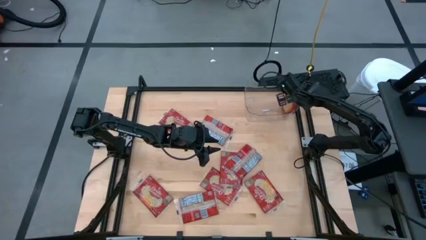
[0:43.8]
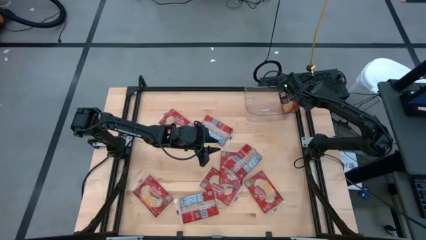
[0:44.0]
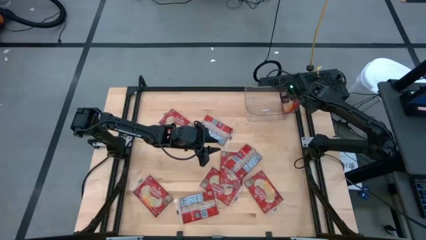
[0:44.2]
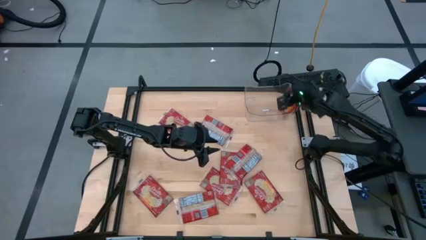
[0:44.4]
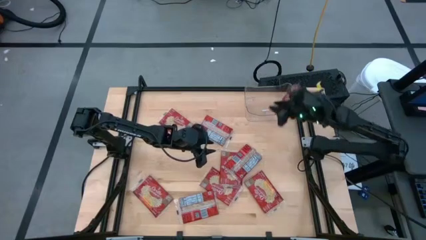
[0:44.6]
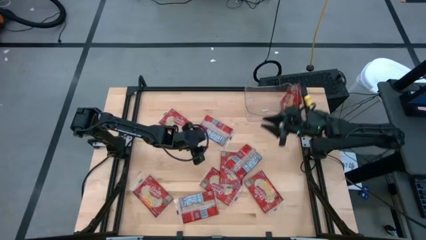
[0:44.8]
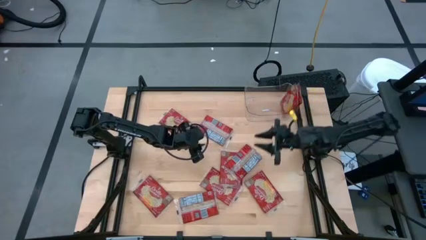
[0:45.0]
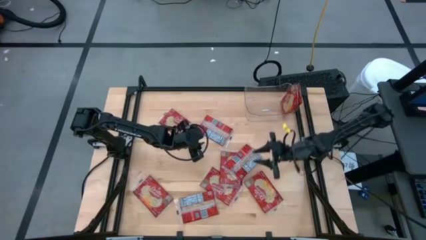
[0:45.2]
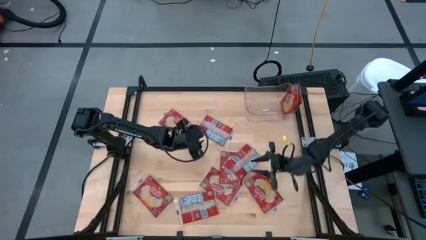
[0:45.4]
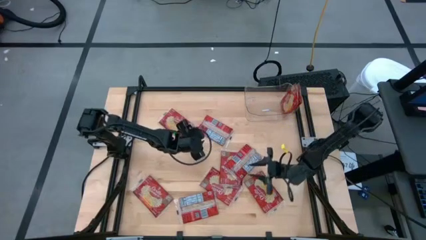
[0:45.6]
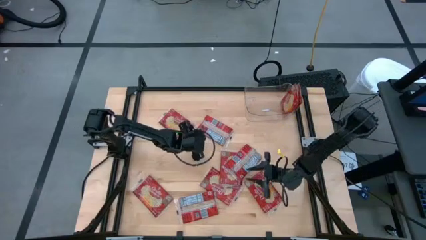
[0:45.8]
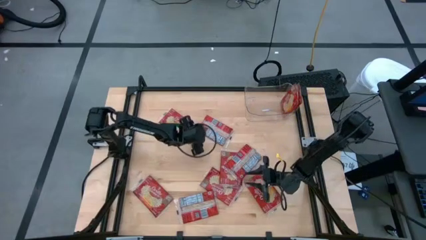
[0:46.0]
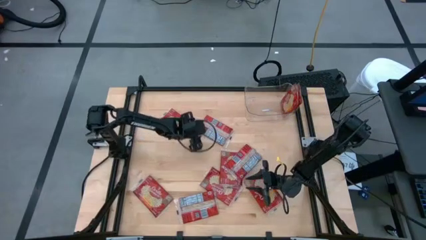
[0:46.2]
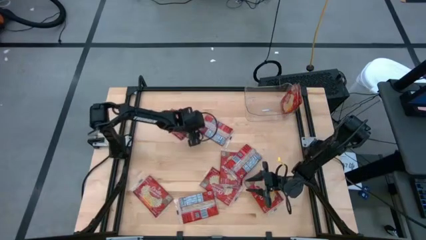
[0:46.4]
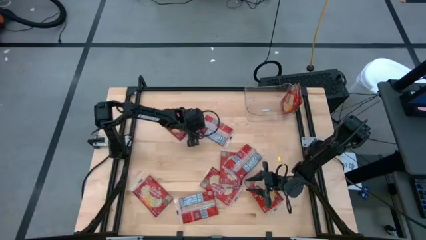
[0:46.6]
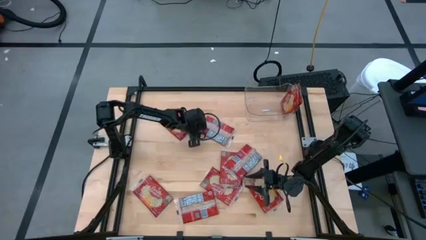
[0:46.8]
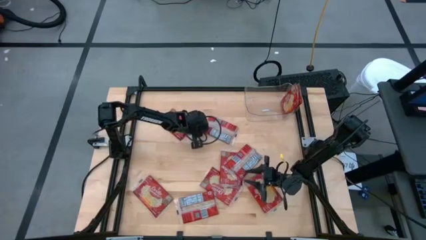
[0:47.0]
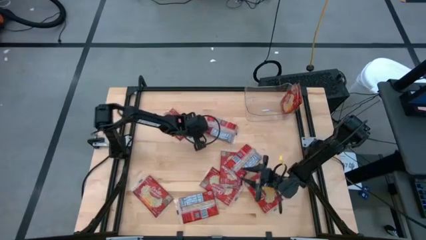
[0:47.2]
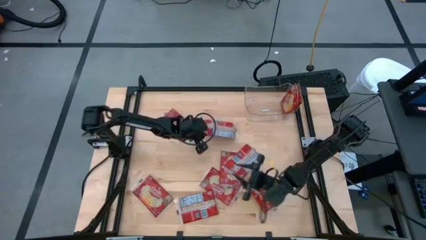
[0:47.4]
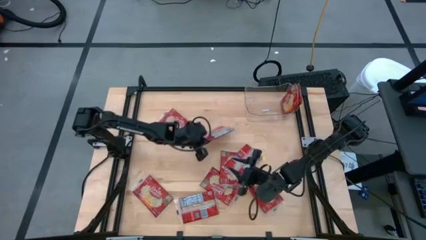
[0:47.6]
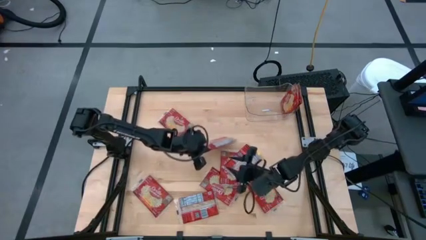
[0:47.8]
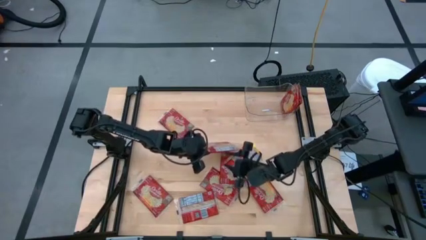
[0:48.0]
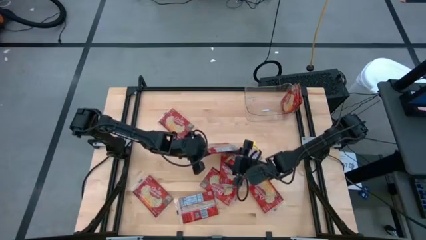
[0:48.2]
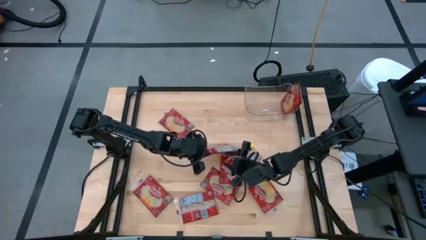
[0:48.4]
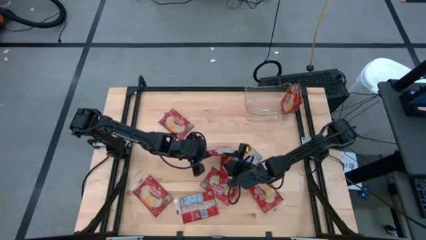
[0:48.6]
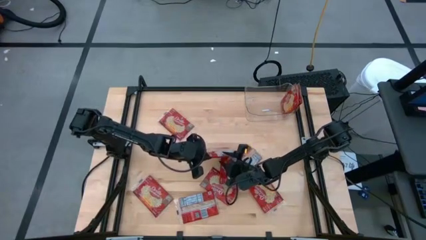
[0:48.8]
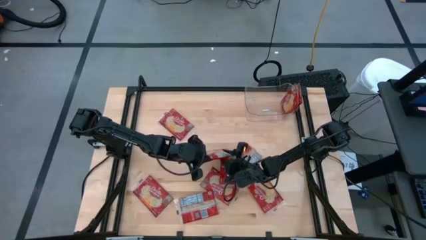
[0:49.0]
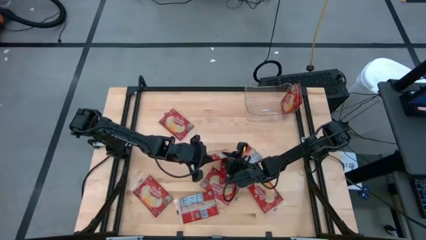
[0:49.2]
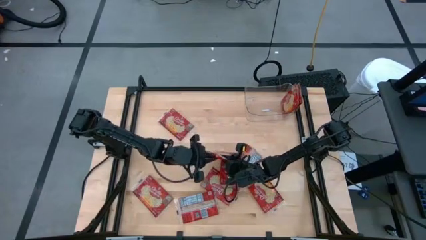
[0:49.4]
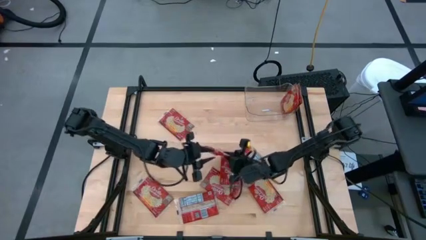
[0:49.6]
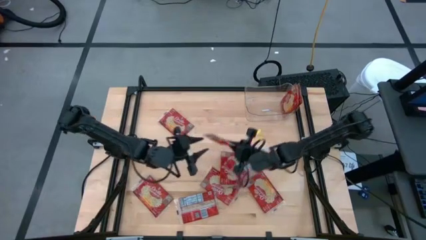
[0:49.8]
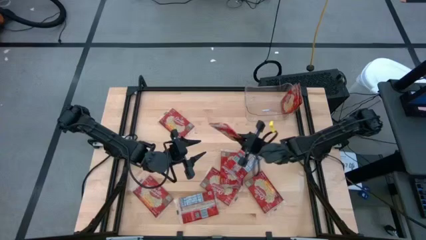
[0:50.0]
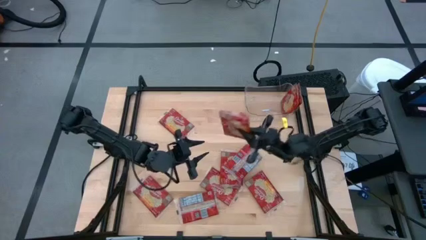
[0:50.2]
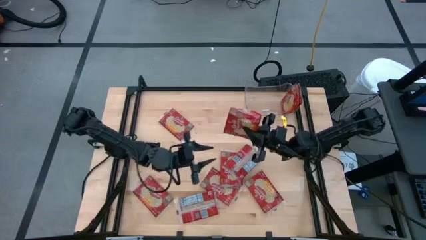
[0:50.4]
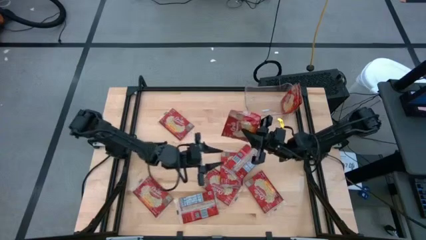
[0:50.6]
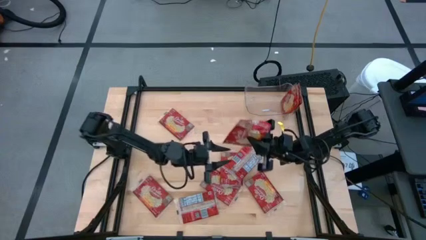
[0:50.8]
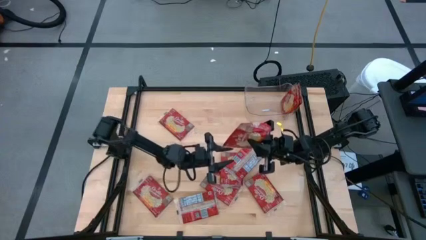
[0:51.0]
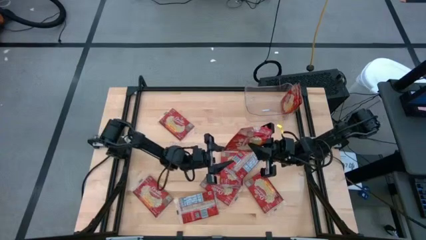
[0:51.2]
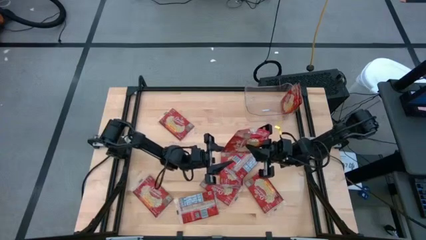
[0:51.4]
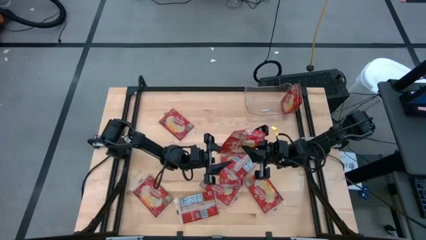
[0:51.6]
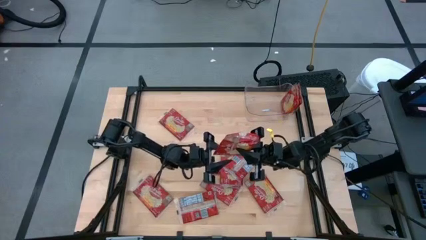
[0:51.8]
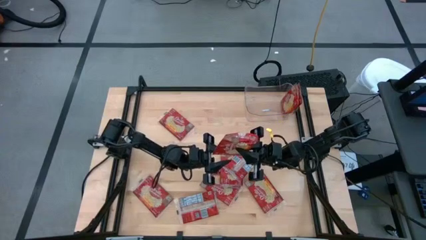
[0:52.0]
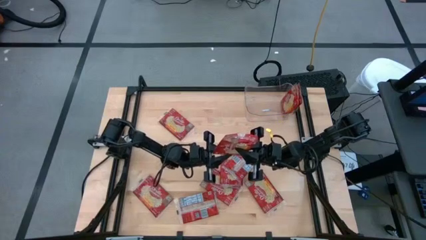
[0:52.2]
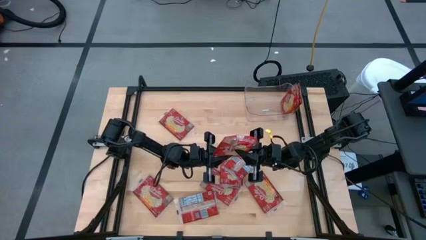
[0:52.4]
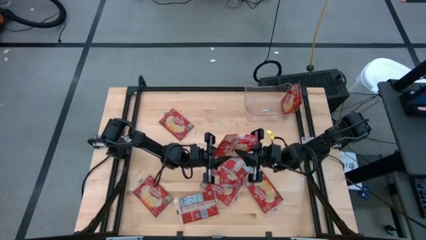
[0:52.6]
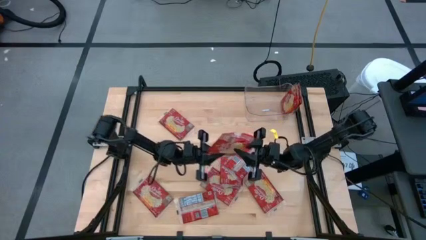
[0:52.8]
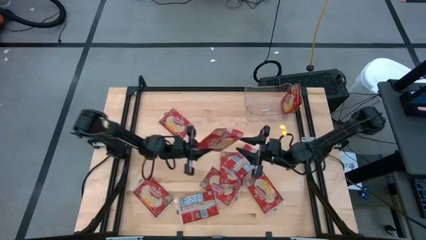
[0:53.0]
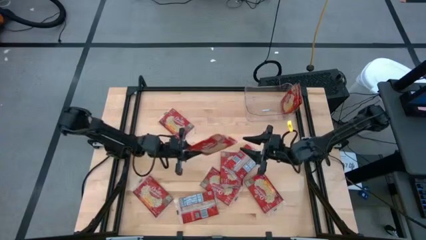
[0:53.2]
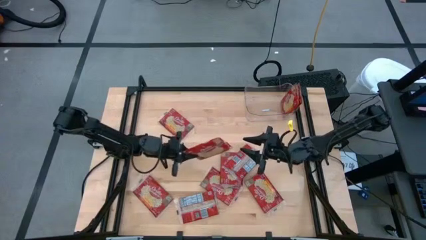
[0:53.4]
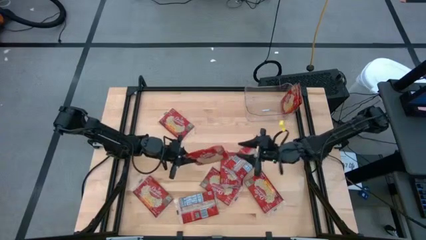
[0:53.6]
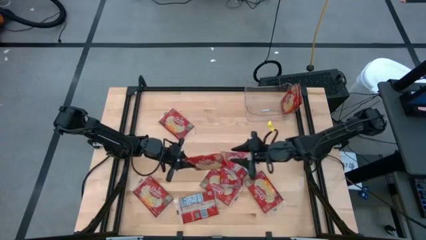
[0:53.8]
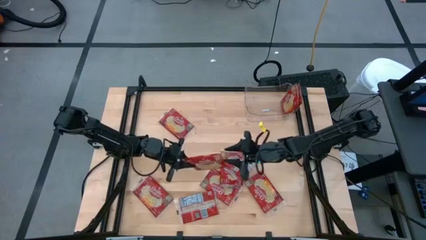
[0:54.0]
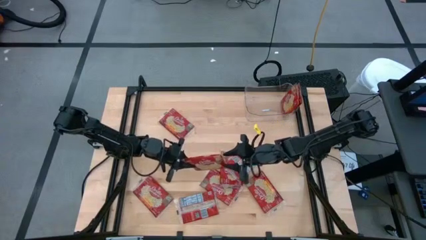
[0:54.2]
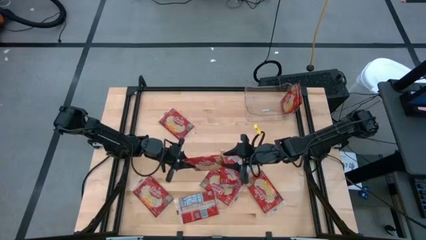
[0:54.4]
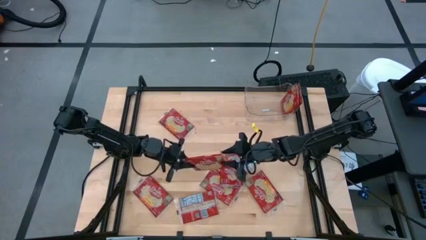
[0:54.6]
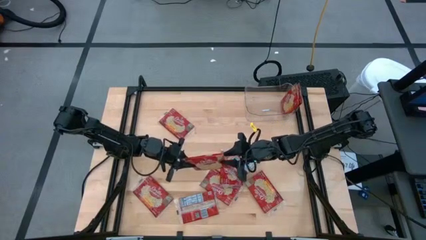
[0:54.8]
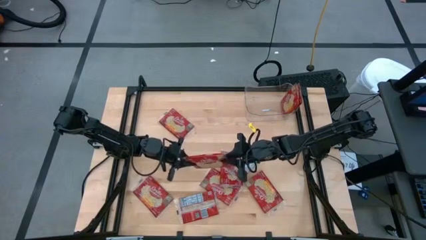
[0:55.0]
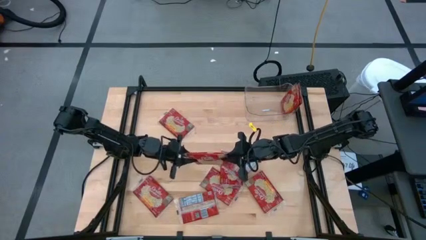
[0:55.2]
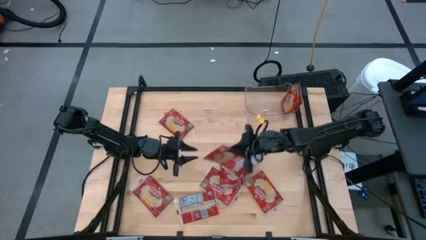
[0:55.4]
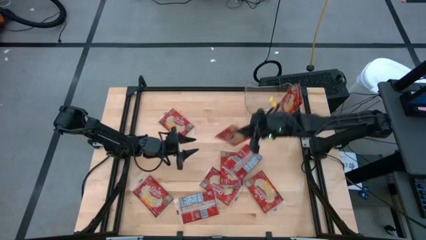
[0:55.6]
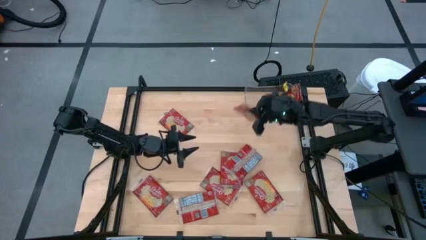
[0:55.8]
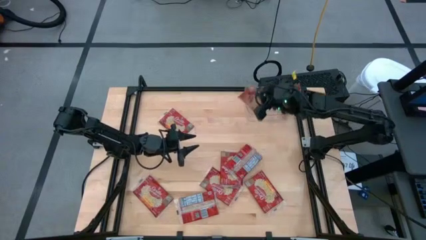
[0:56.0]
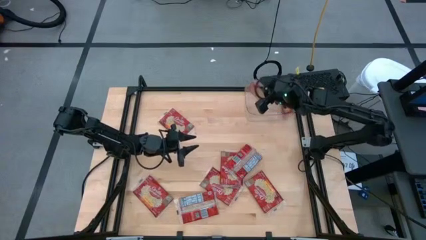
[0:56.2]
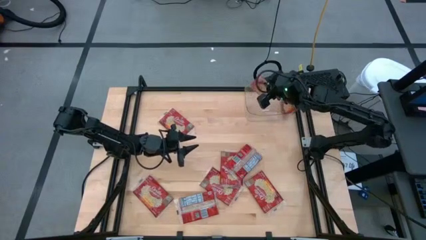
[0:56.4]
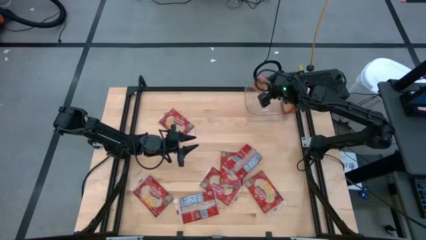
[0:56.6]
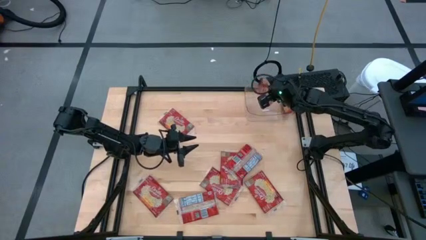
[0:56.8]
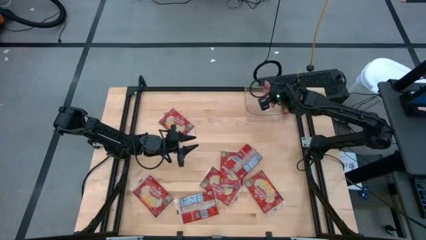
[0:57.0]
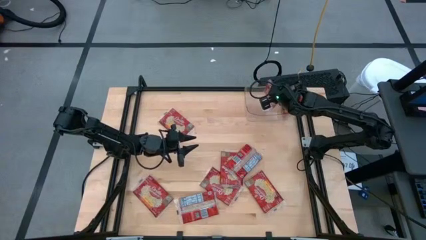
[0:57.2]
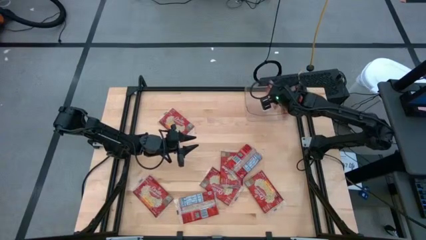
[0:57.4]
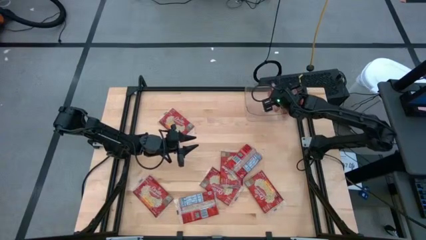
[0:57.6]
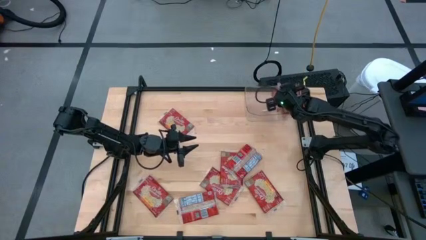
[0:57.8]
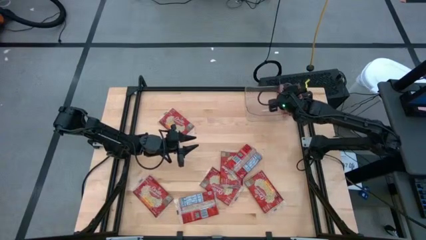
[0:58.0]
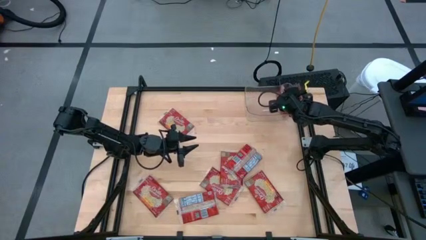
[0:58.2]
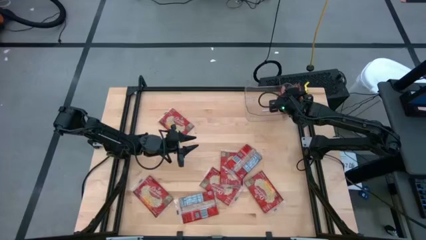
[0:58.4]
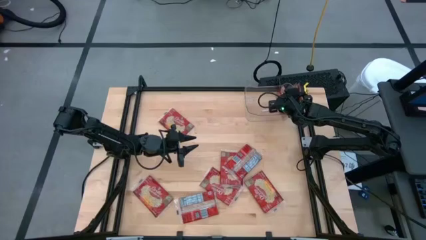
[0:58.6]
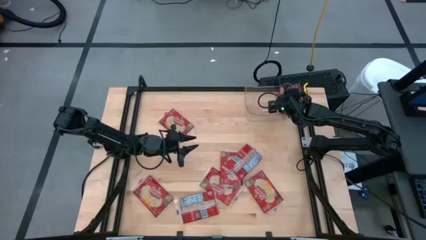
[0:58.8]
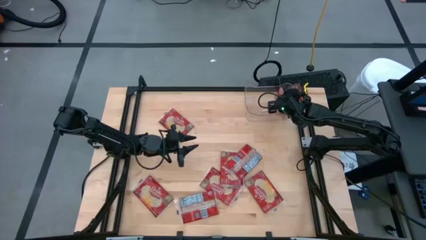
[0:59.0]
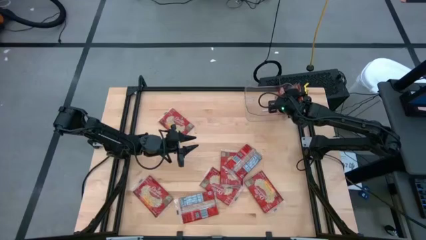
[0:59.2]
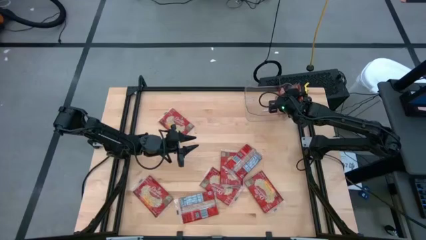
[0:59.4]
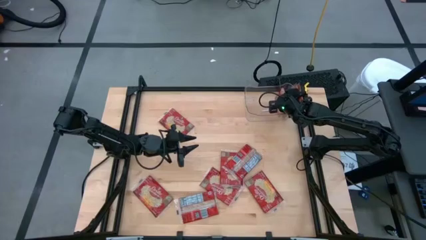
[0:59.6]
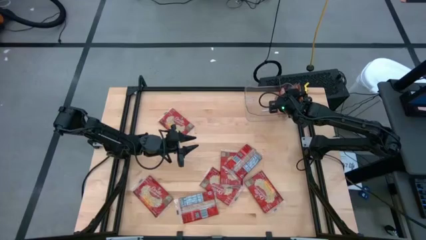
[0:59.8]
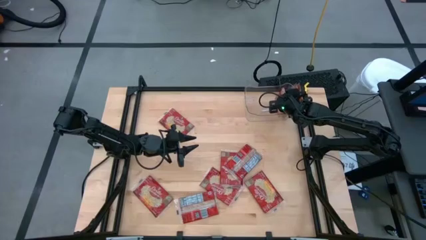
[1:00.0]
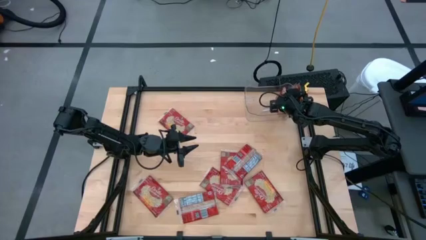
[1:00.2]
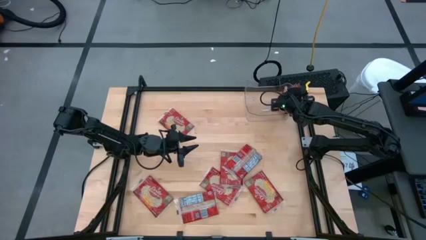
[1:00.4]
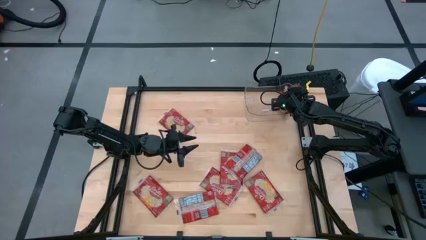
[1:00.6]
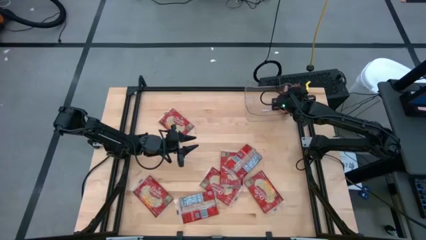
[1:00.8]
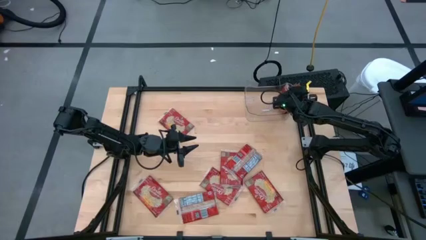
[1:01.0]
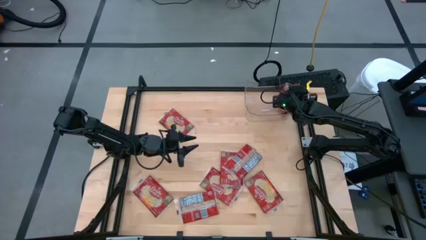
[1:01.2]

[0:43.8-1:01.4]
Task: Sort popcorn bags into baskets
Put the red popcorn bag into the transparent bin
